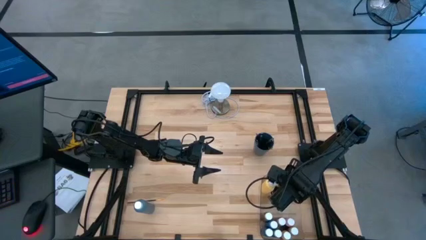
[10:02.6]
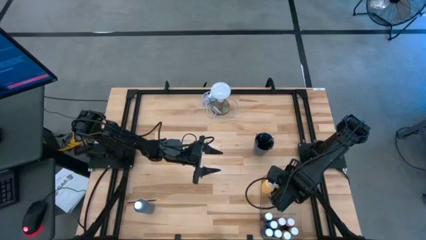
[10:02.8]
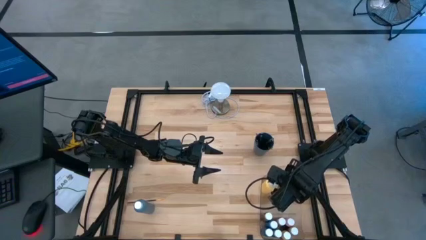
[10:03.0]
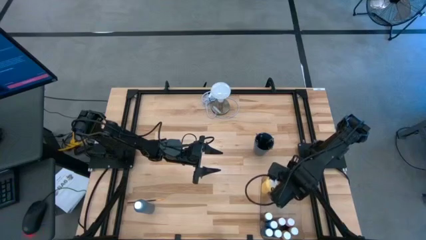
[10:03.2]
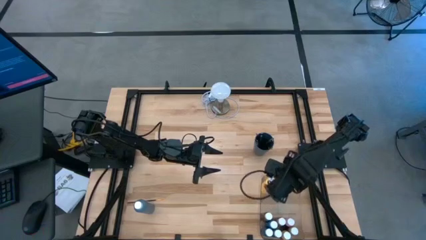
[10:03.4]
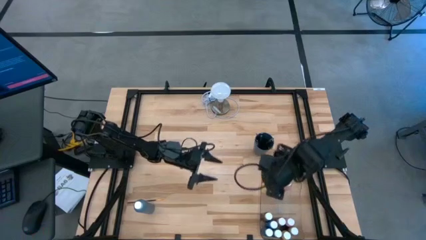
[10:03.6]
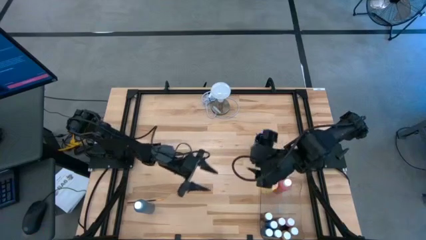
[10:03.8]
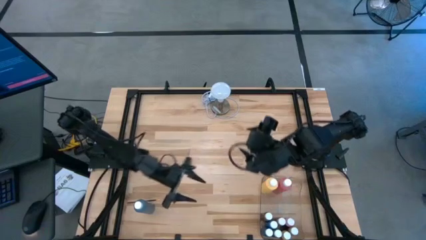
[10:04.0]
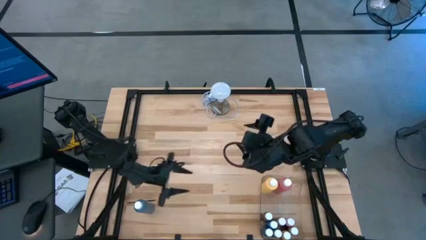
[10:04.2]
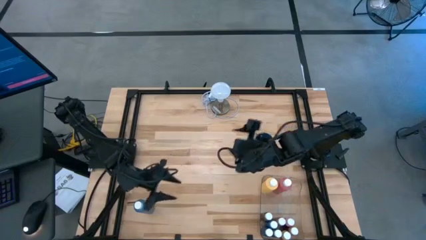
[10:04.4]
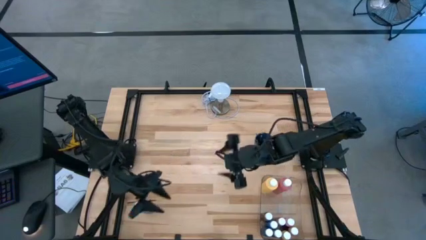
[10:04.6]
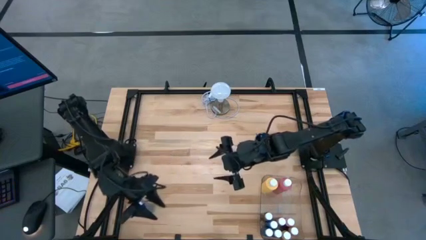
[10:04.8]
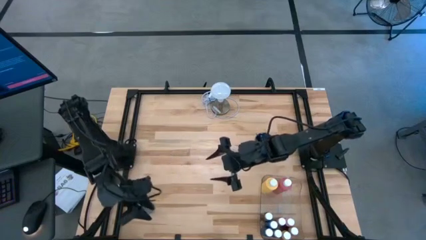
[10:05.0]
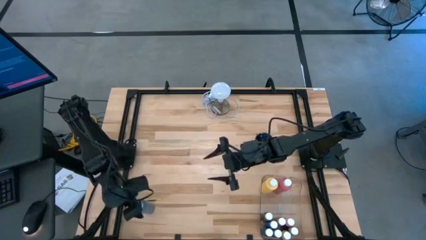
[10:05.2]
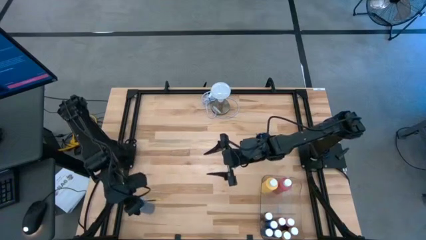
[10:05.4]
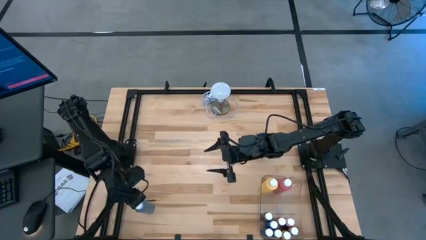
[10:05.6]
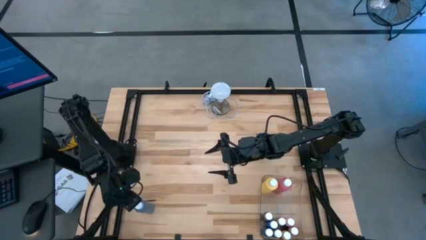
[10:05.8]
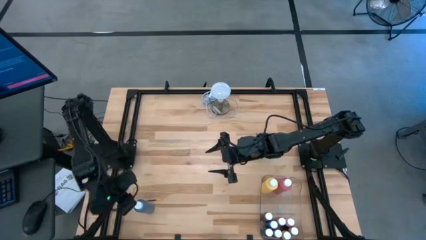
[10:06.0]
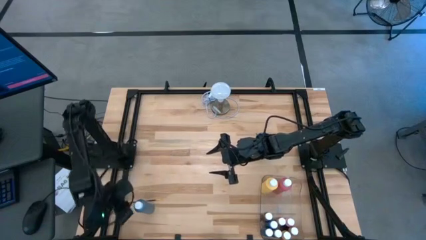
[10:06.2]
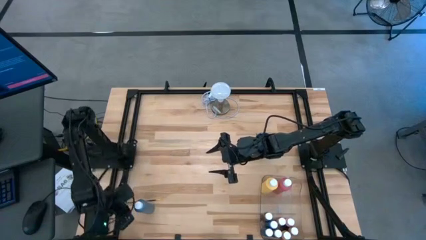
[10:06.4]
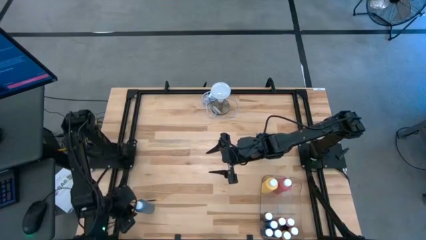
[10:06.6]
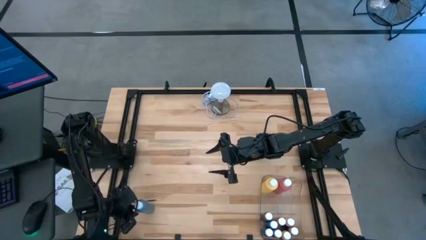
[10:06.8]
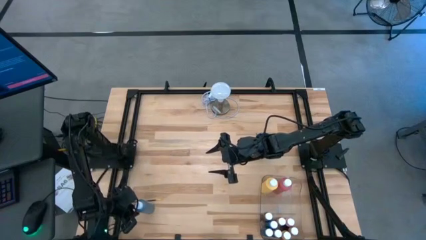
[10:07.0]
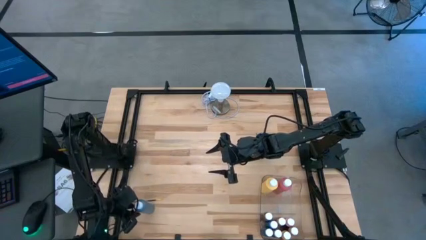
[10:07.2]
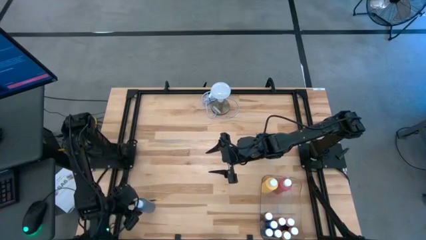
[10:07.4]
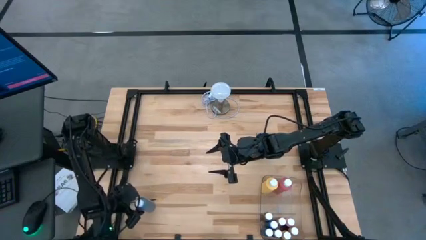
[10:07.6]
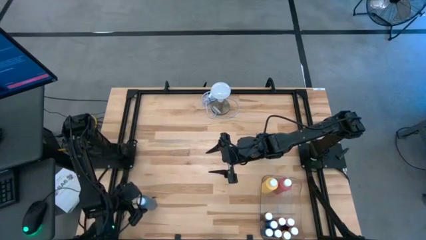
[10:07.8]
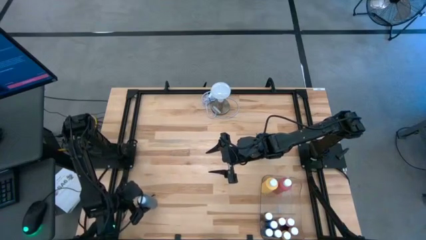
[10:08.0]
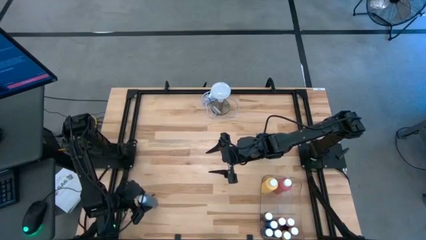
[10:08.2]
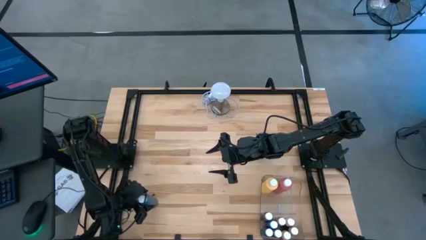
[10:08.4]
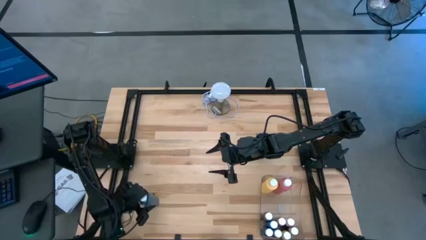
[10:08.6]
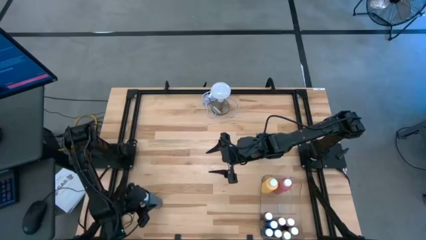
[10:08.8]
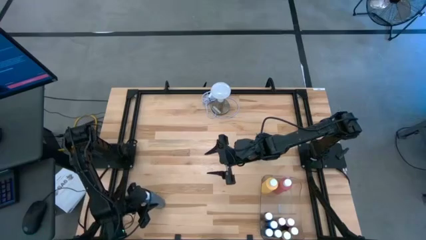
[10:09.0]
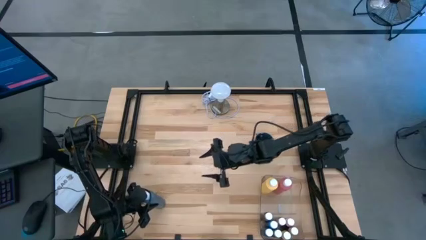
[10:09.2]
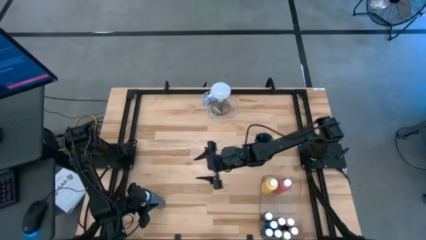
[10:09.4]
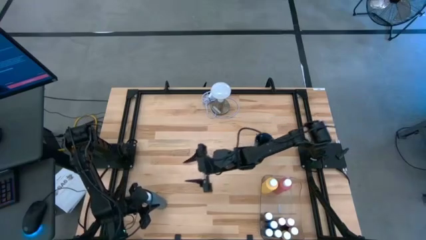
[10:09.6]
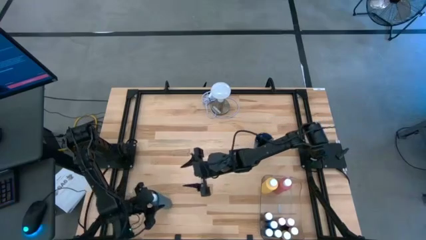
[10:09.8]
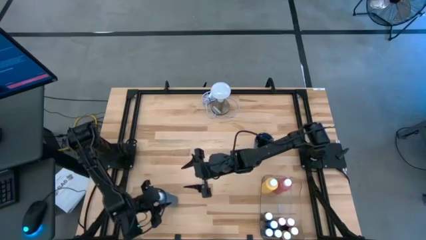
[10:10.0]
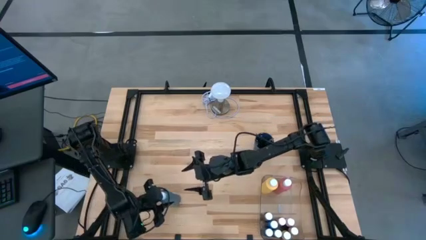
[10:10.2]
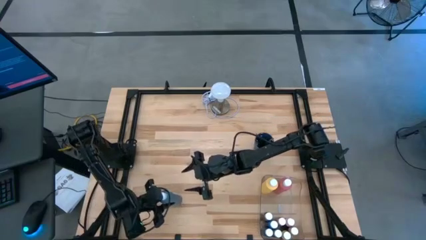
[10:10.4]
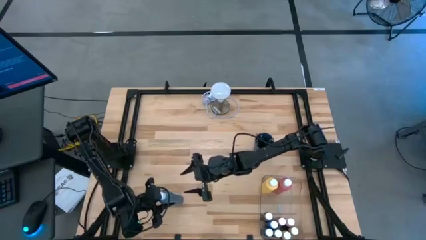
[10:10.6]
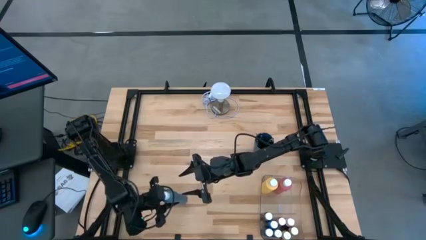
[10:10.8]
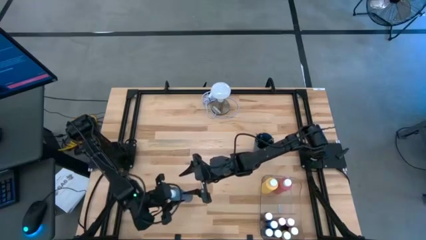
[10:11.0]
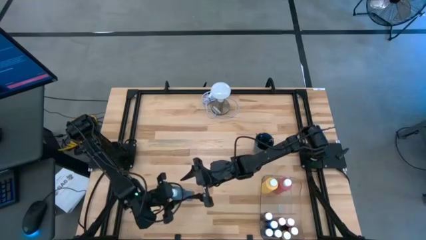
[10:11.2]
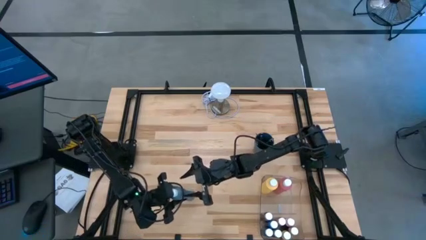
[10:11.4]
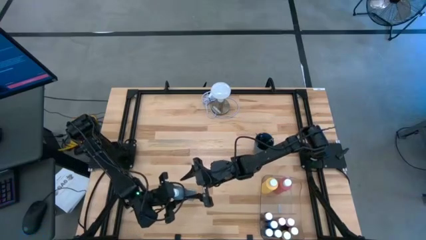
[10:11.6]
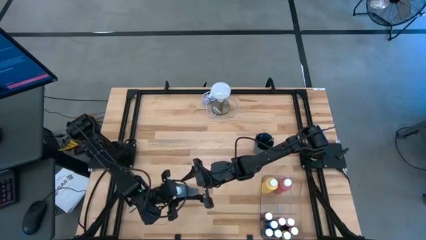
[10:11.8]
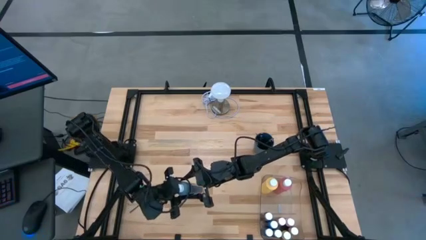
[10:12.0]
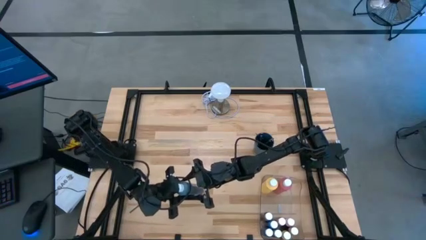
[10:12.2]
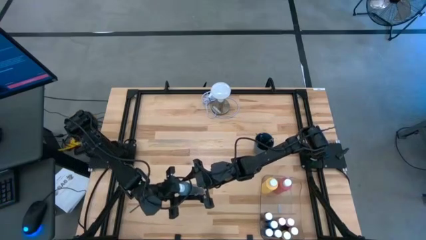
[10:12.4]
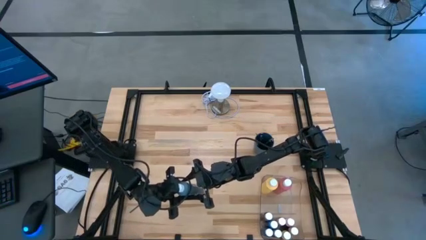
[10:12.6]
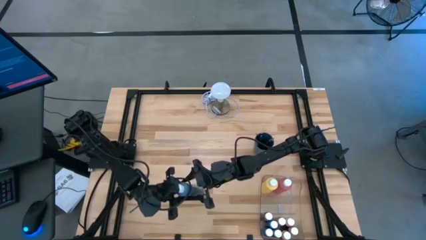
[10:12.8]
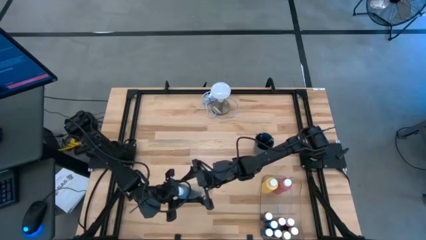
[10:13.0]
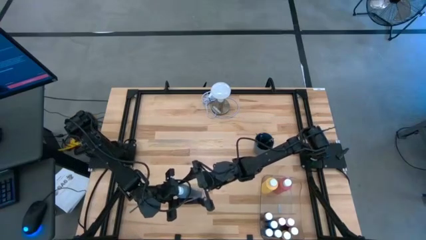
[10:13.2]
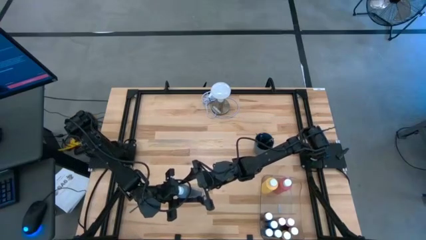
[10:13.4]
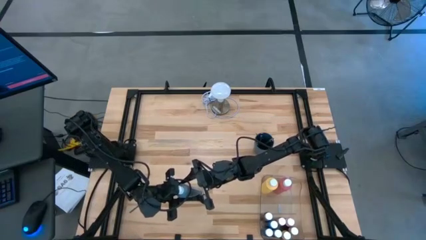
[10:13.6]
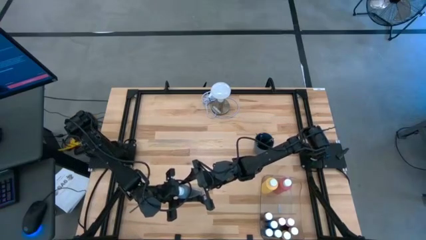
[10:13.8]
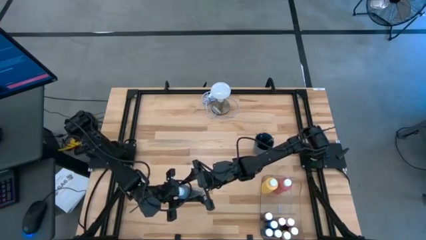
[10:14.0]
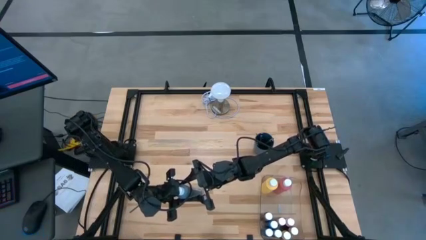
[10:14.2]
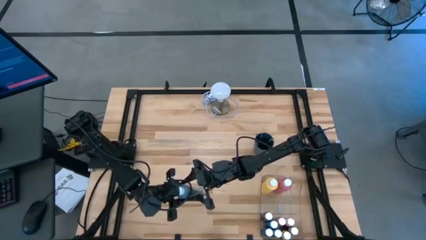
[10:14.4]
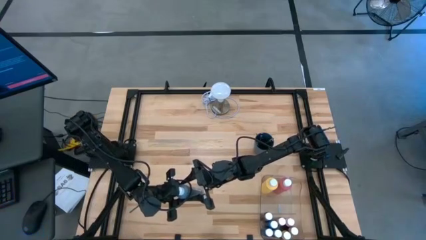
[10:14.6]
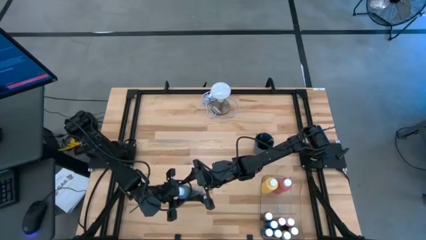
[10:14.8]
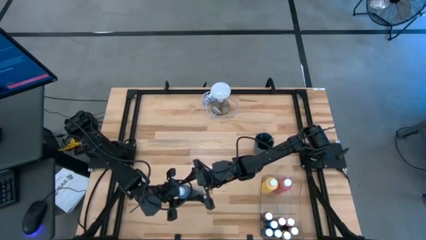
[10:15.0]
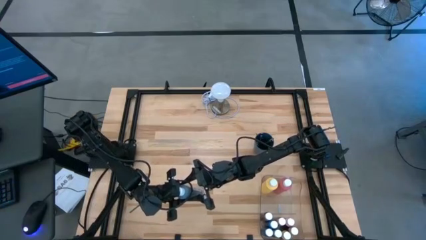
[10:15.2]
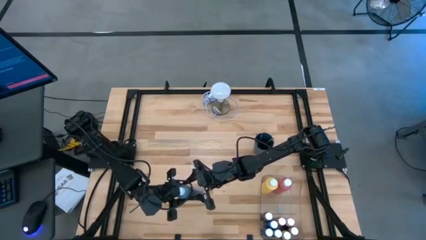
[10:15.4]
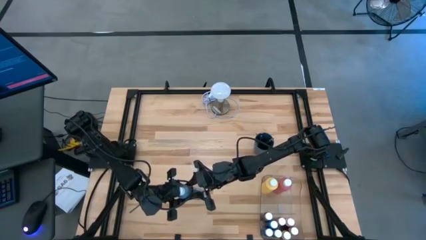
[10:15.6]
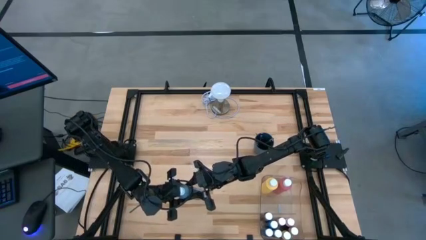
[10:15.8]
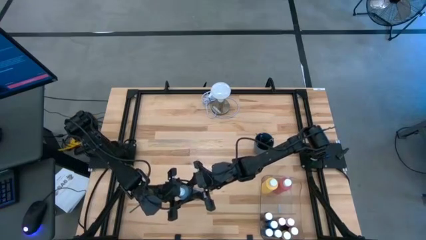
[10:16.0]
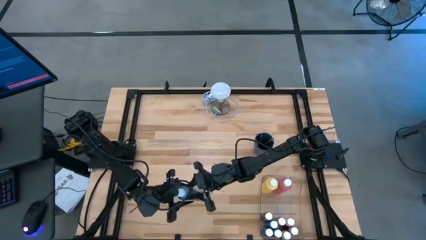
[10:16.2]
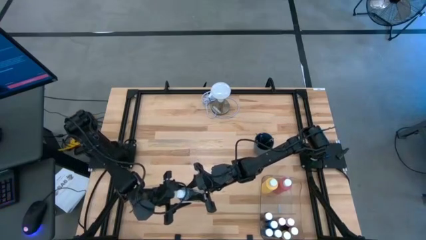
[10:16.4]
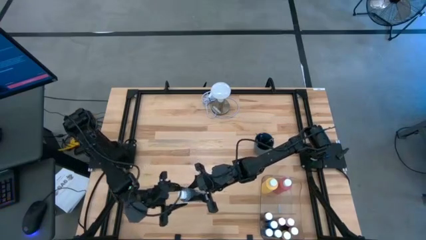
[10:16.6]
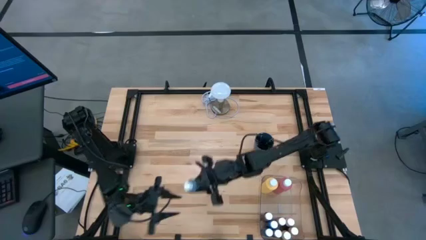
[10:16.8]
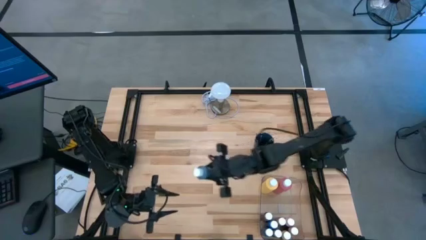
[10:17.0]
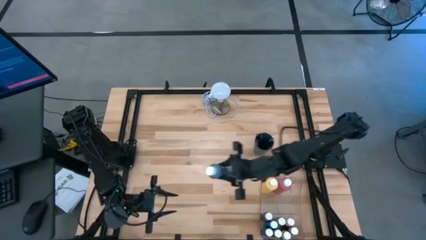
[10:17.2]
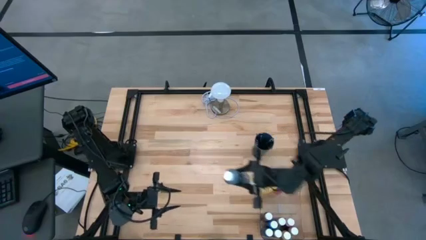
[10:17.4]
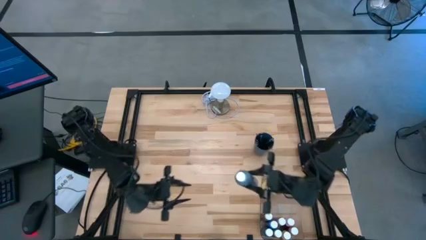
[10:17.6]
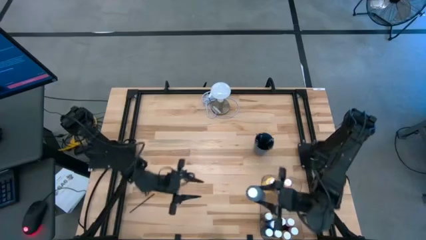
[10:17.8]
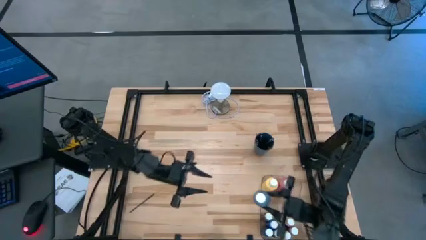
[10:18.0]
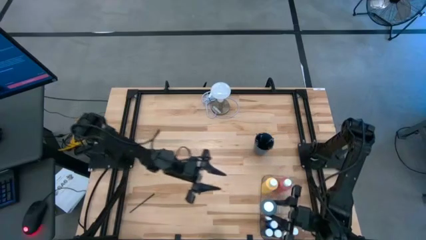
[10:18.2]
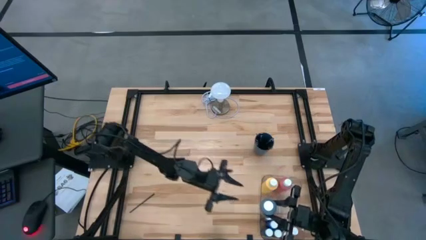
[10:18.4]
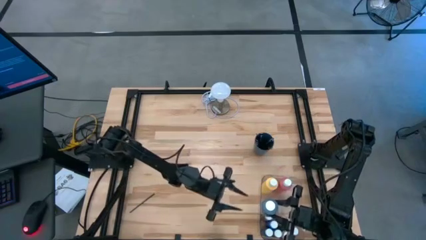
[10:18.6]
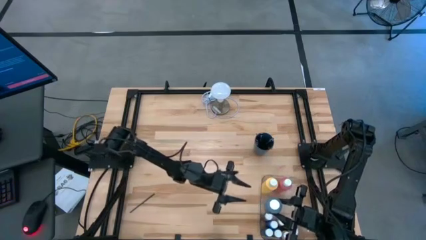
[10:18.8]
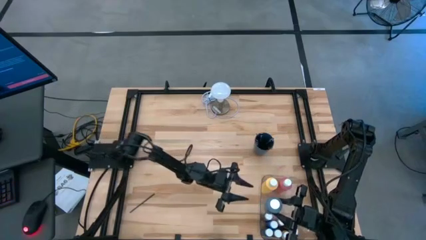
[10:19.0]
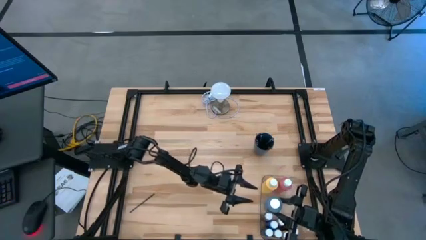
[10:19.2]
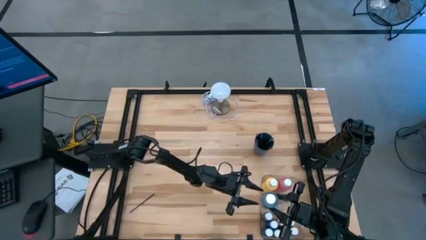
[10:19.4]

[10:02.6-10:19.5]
Task: Pick & Place Paint Supplies
Put the large dark blue paint bottle into the transparent bin
